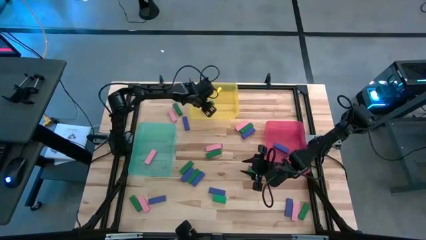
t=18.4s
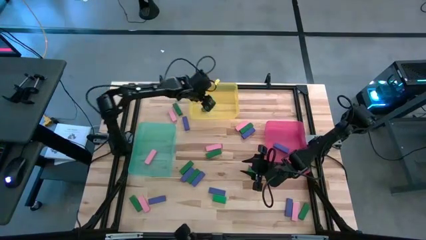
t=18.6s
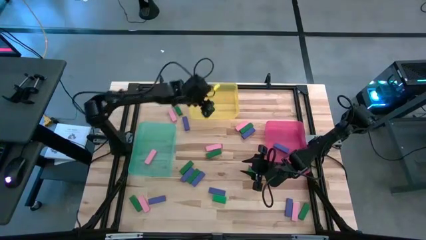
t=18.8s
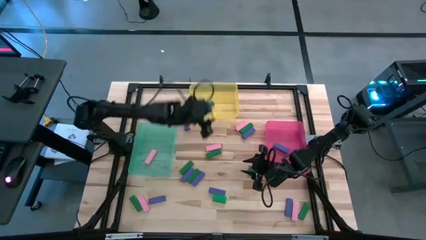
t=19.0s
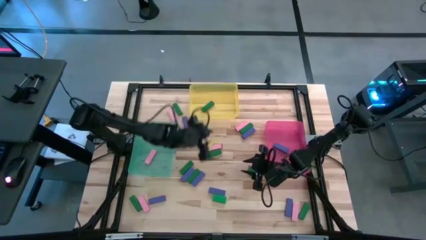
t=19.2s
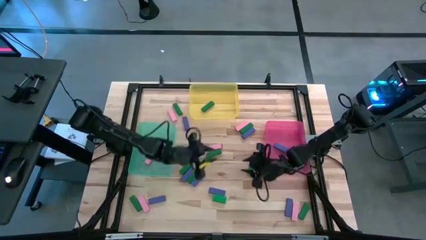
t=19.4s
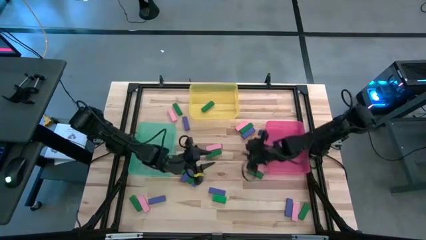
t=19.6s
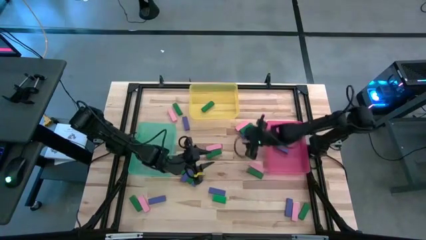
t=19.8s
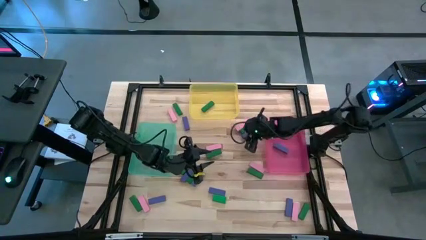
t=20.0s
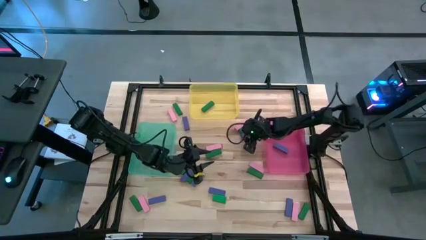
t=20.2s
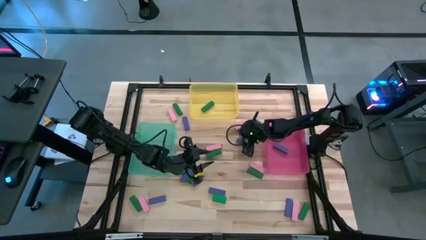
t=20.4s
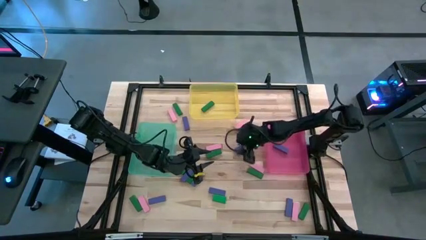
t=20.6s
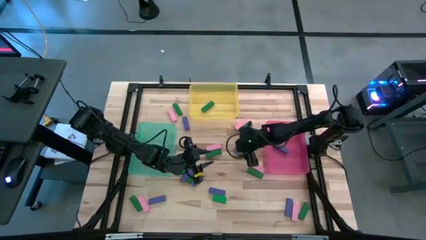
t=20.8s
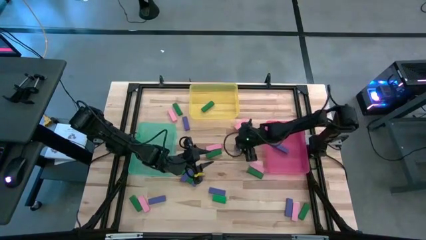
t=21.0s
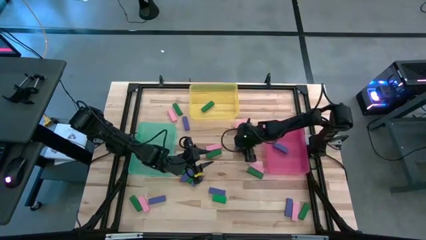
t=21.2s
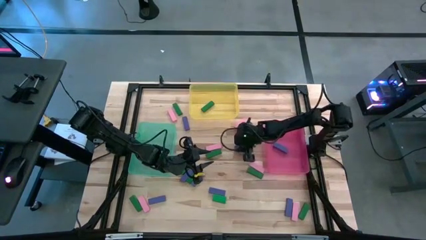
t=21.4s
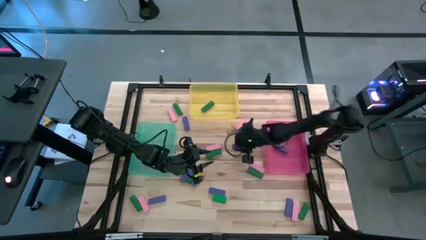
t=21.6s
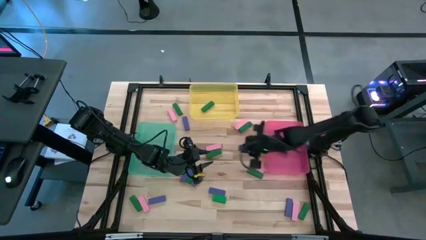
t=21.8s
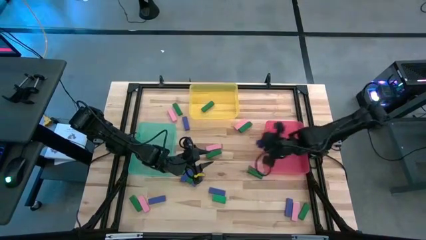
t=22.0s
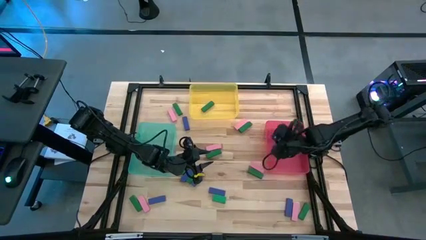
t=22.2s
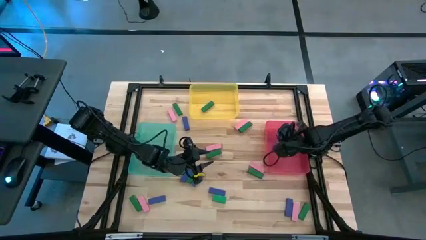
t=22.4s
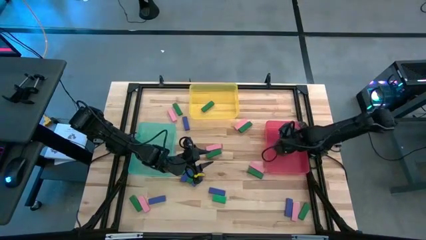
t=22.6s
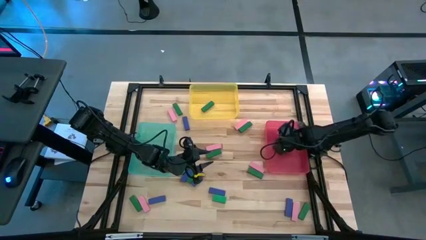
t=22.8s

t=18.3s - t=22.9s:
Task: Sort blocks
Put the blue block into the pink bin

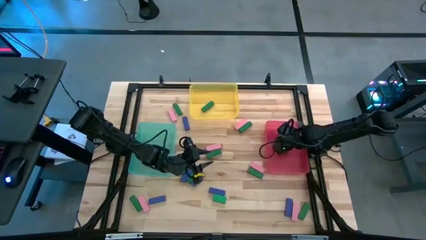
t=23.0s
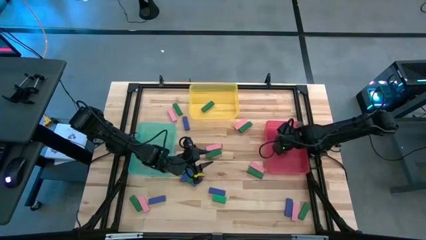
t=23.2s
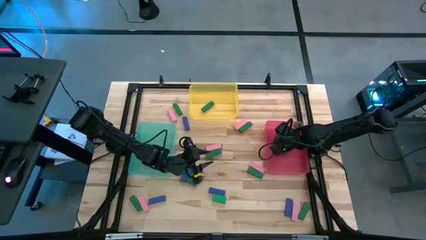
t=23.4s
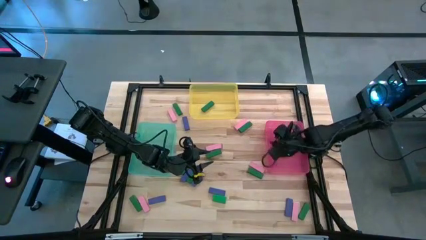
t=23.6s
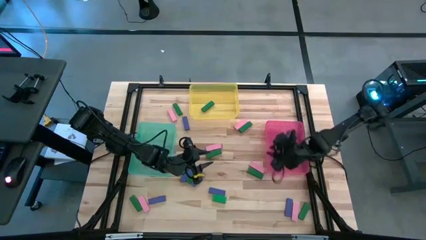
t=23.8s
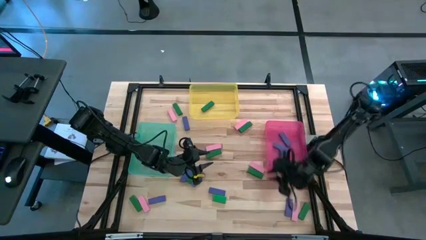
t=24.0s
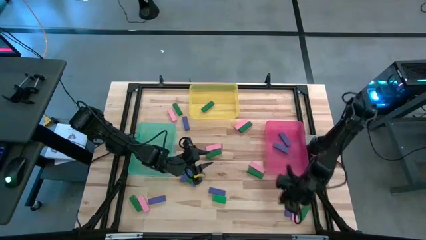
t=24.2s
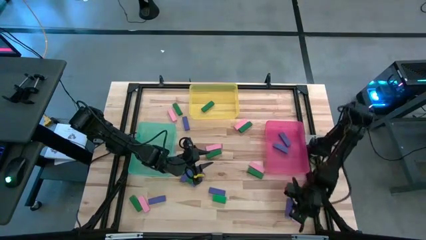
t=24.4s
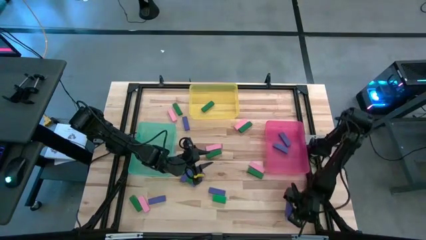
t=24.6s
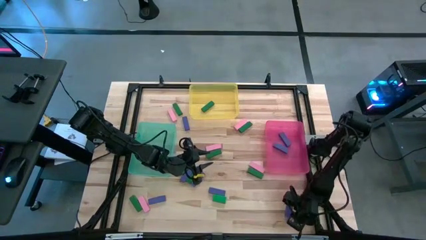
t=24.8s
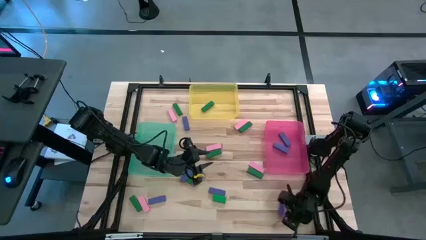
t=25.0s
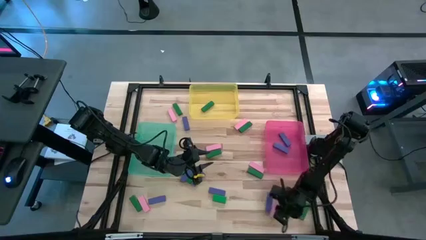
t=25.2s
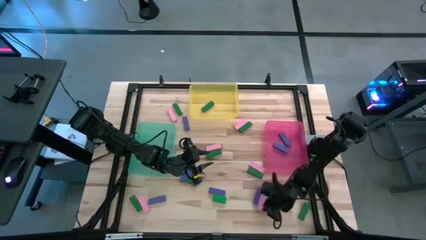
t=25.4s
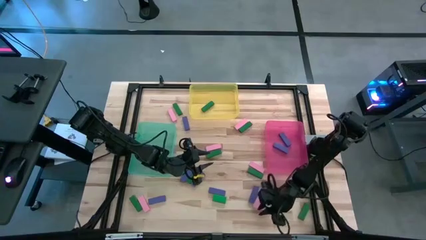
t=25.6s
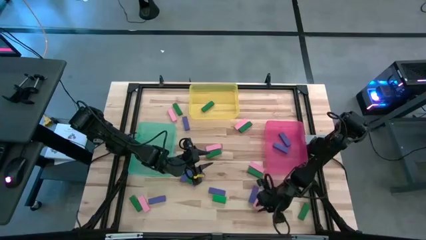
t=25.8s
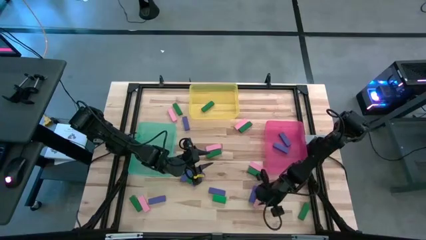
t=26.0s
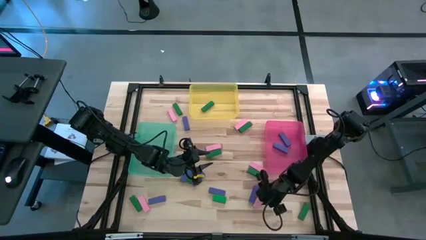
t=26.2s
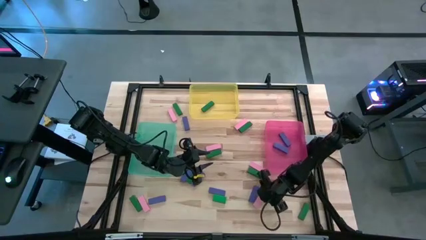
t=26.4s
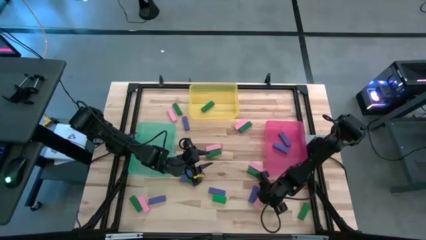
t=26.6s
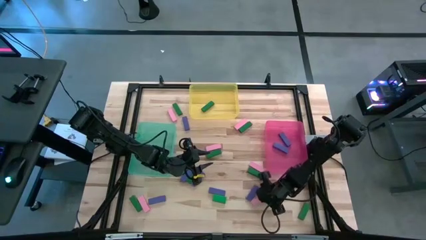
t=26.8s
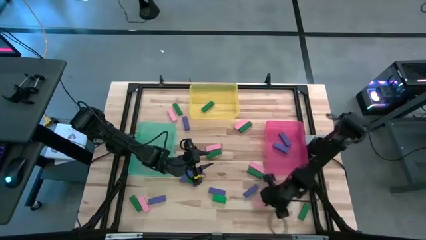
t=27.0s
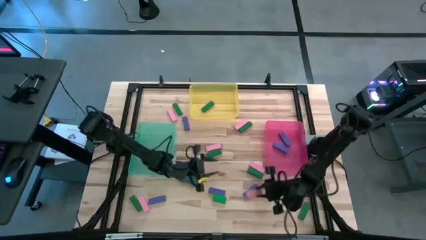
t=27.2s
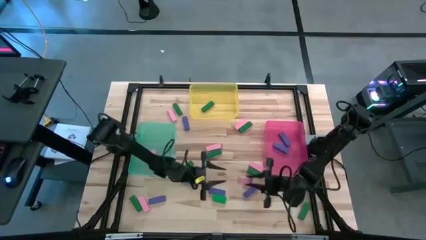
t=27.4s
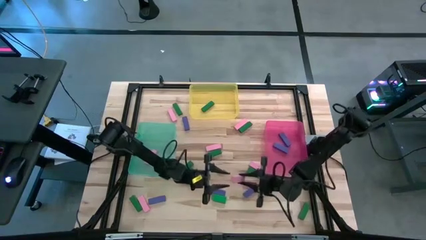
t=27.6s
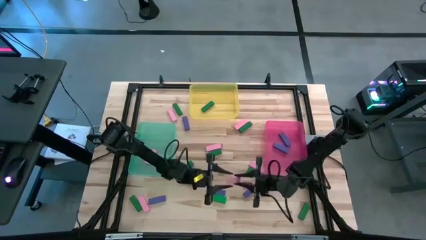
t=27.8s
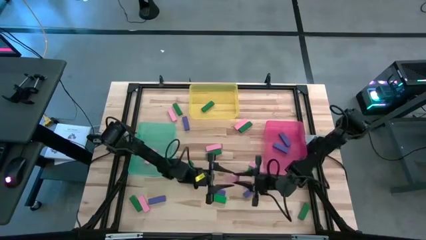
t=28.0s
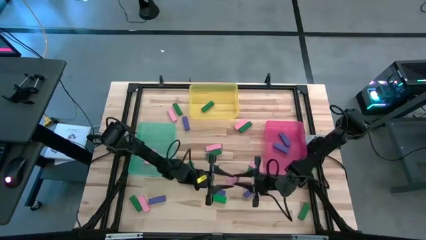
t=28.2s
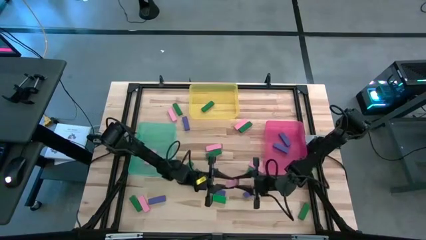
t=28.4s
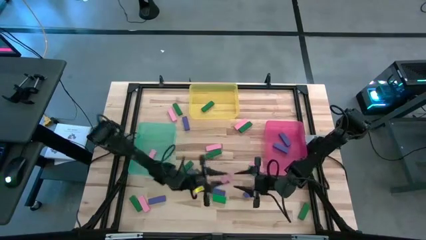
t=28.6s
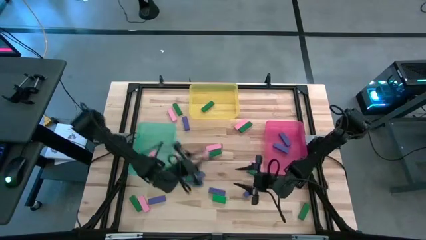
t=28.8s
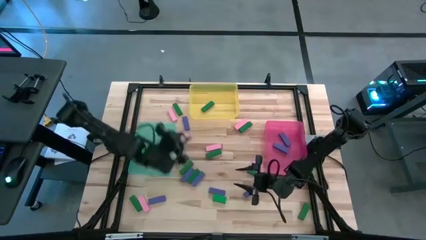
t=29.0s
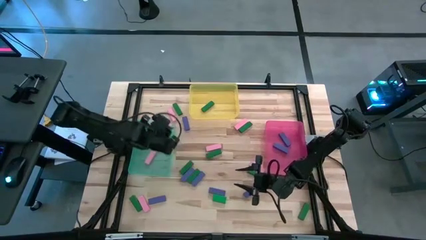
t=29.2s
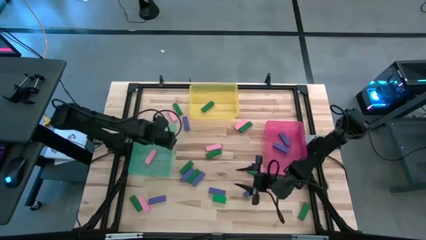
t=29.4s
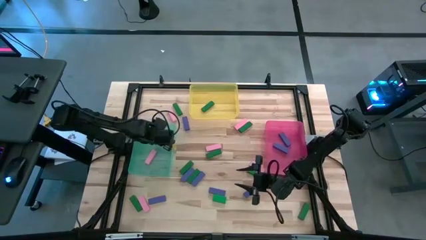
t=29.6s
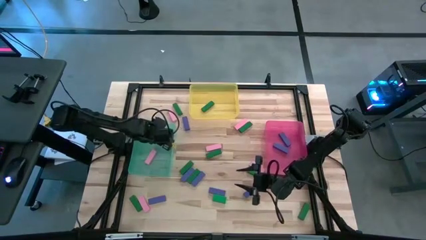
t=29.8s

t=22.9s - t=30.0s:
Put the pink block into the blue bin

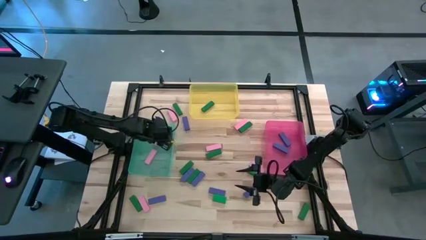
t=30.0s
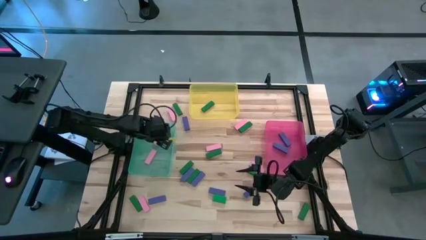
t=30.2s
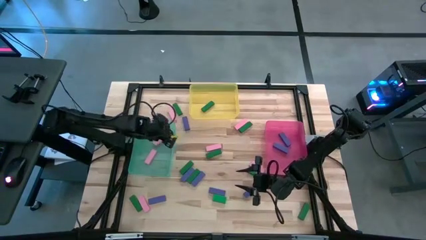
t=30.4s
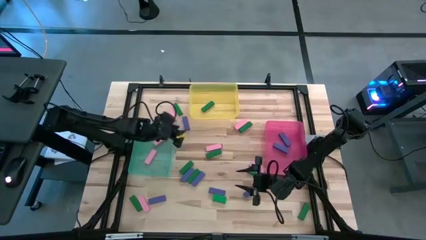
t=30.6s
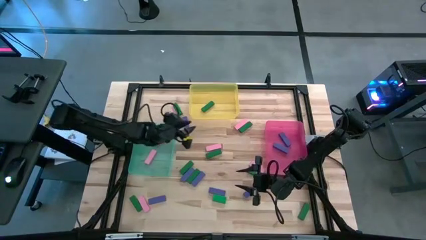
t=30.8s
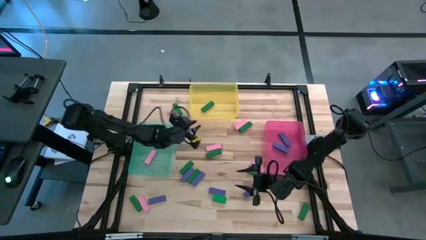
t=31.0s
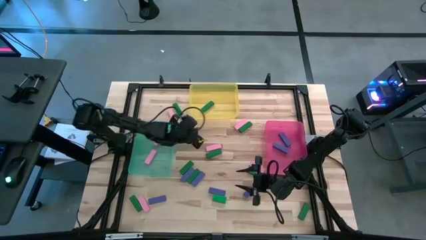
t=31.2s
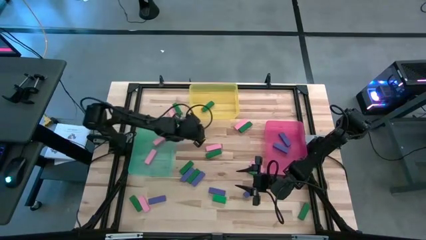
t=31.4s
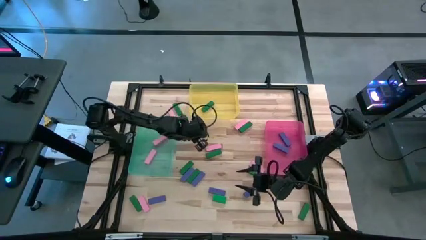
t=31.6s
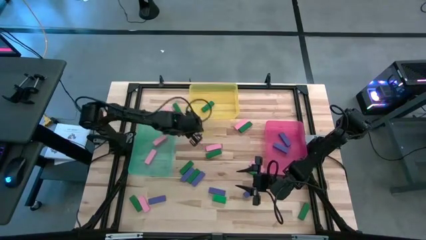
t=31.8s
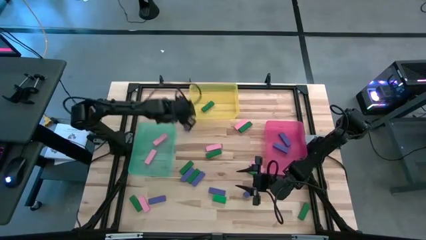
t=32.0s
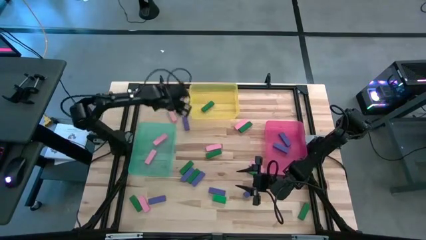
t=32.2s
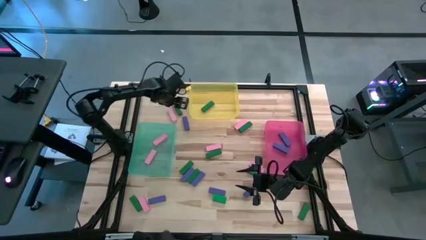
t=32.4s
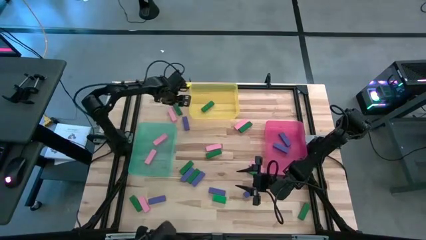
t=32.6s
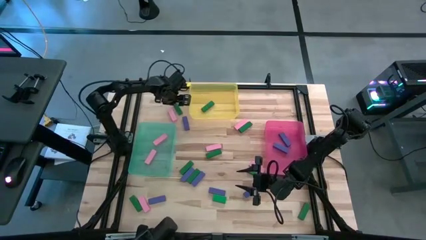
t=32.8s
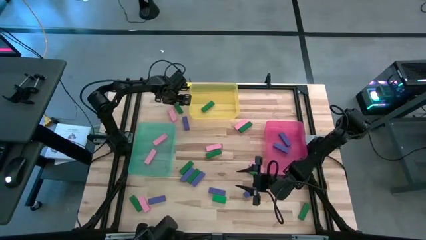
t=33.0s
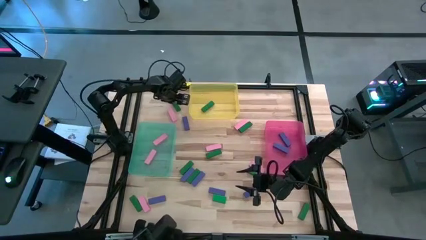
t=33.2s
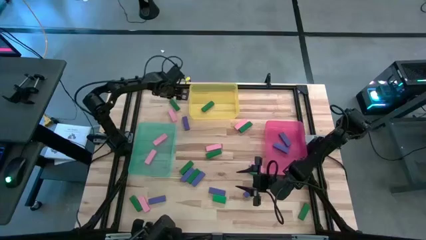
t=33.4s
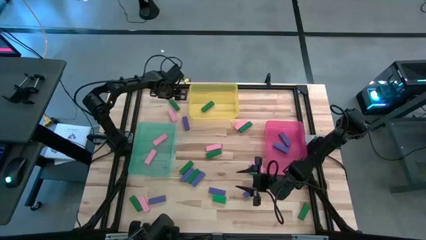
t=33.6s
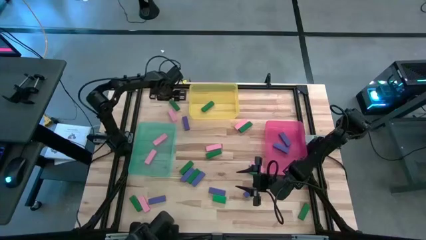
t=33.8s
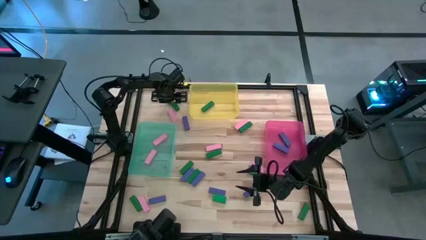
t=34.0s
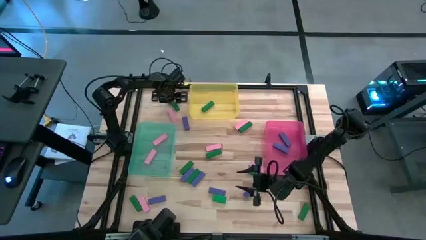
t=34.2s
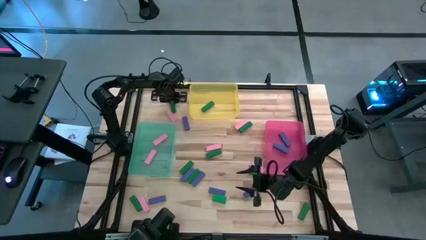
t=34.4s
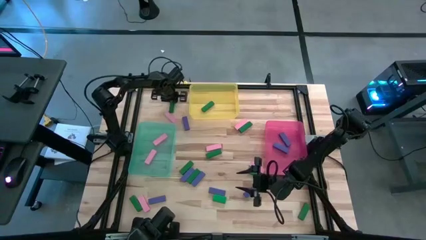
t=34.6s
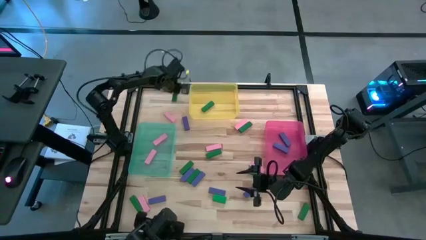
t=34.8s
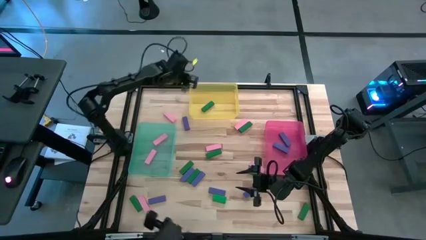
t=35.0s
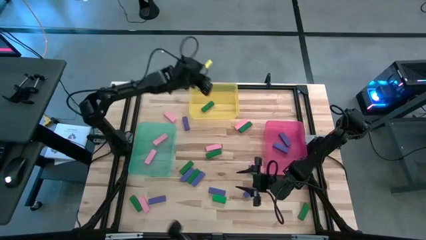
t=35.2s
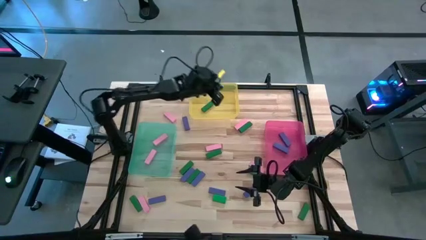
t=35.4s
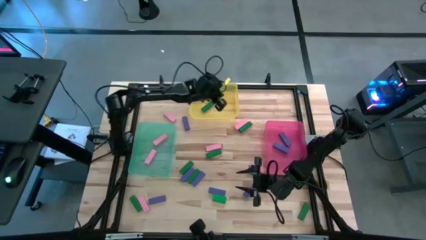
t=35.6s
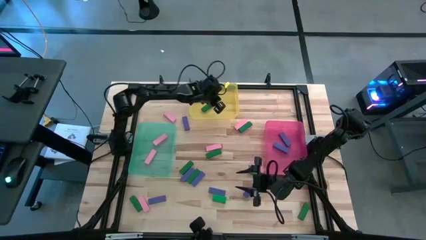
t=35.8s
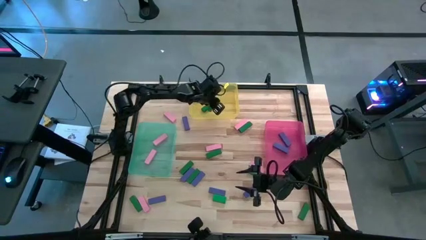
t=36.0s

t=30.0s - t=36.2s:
Put the green block into the yellow bin
